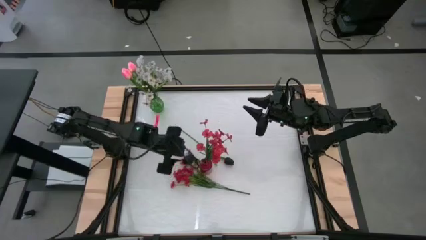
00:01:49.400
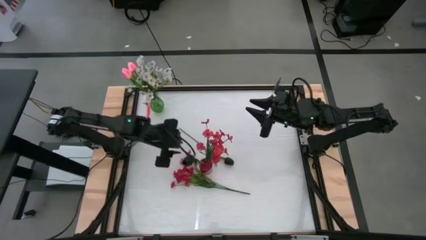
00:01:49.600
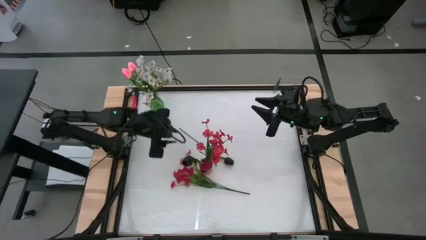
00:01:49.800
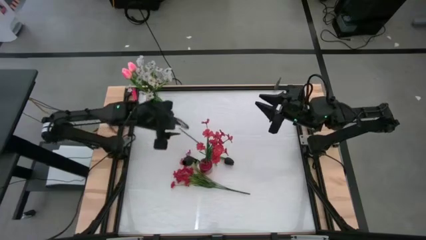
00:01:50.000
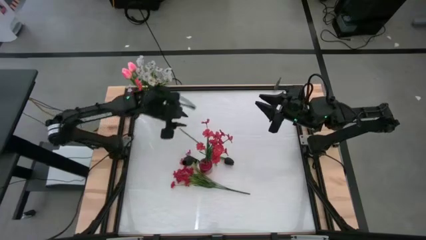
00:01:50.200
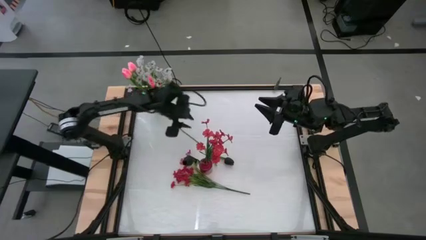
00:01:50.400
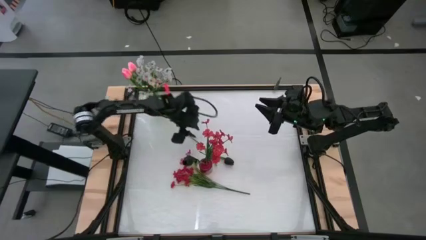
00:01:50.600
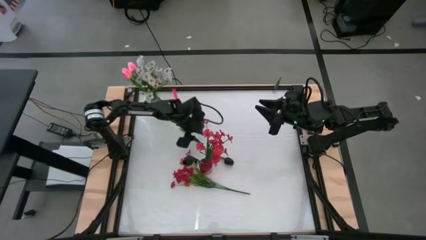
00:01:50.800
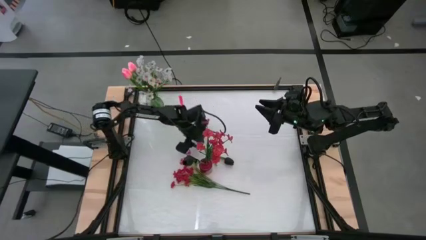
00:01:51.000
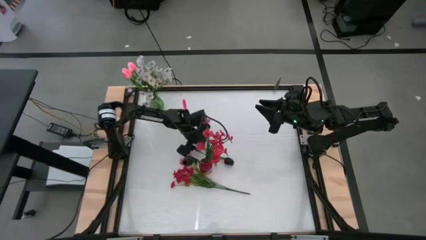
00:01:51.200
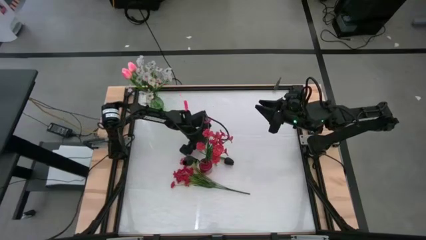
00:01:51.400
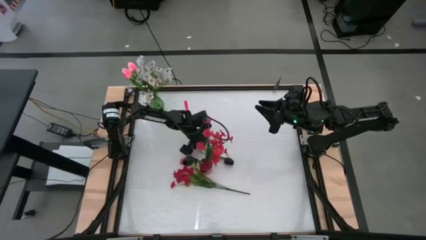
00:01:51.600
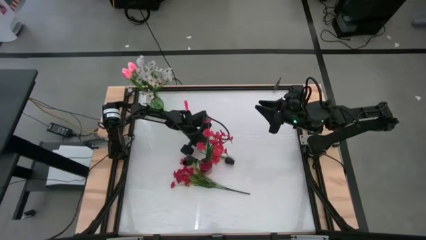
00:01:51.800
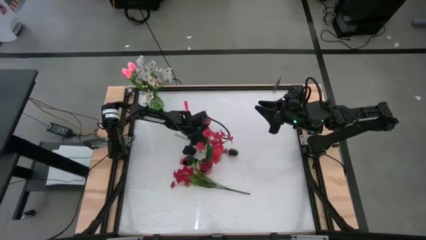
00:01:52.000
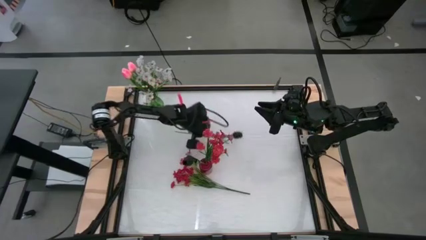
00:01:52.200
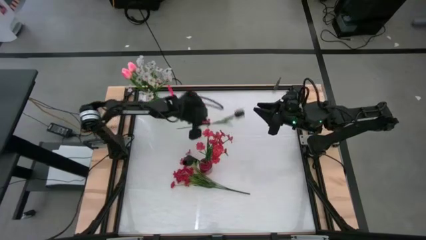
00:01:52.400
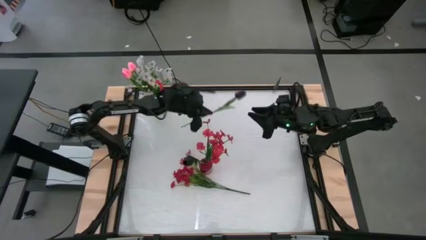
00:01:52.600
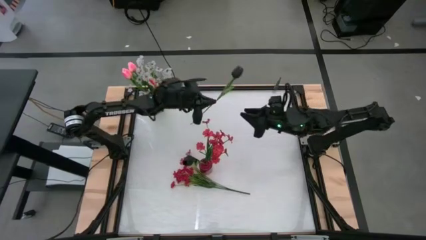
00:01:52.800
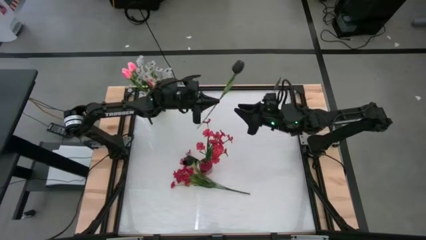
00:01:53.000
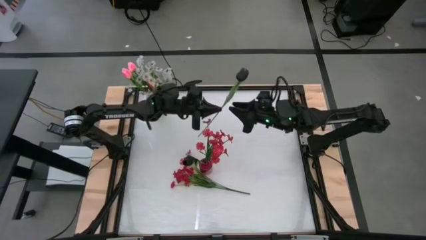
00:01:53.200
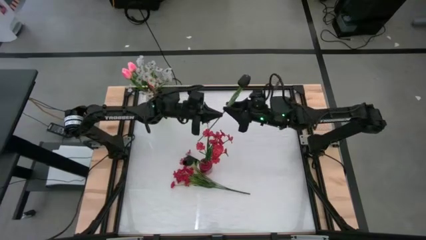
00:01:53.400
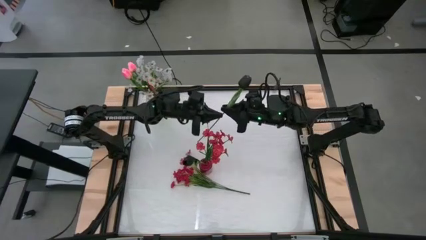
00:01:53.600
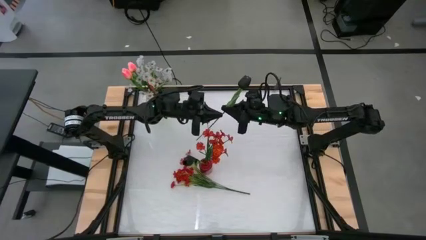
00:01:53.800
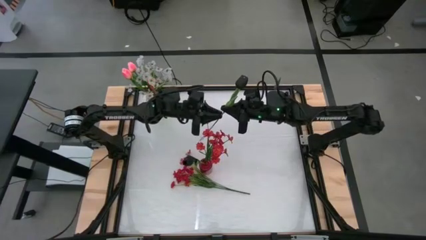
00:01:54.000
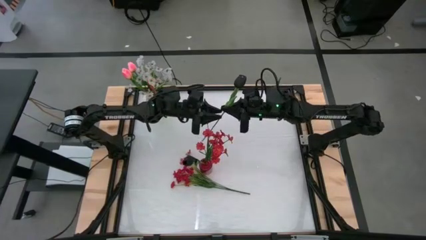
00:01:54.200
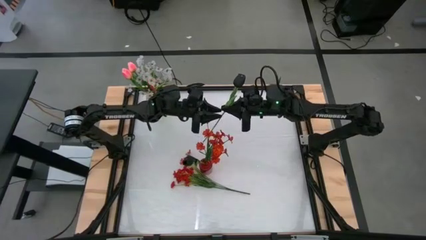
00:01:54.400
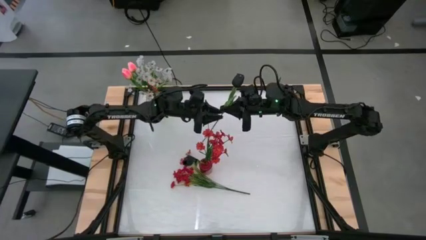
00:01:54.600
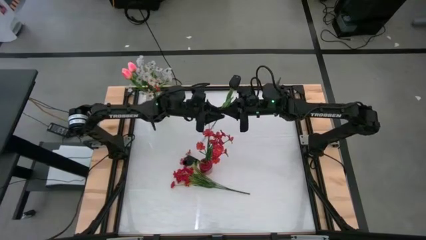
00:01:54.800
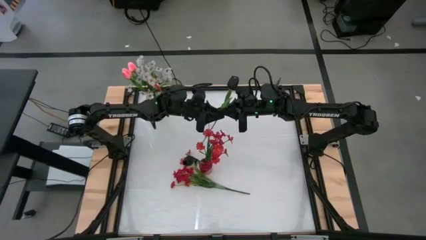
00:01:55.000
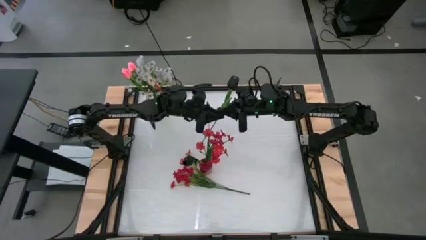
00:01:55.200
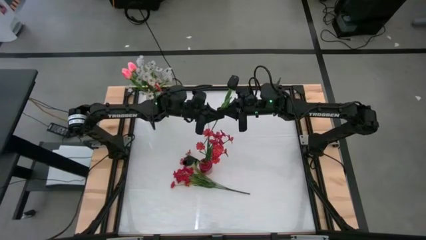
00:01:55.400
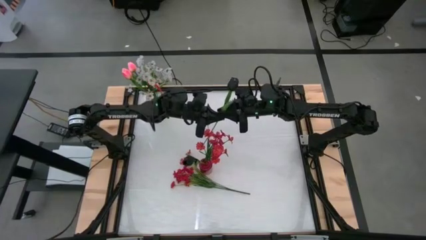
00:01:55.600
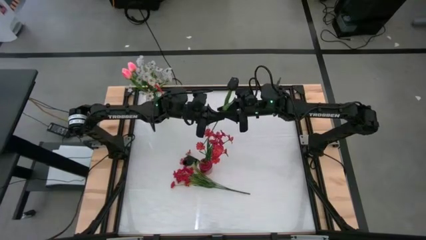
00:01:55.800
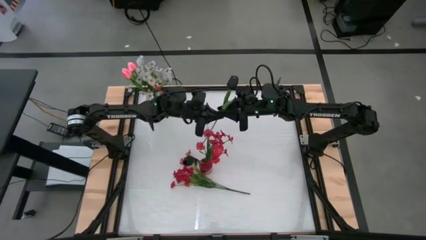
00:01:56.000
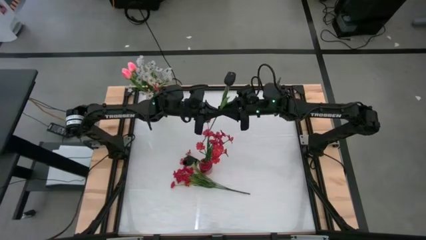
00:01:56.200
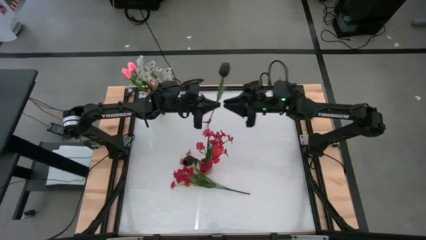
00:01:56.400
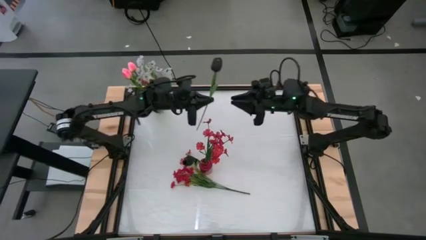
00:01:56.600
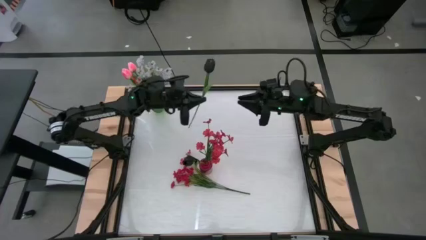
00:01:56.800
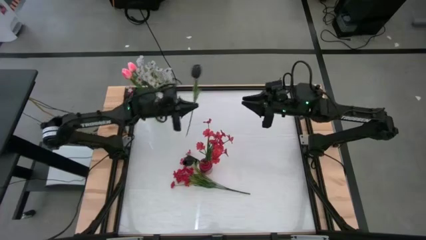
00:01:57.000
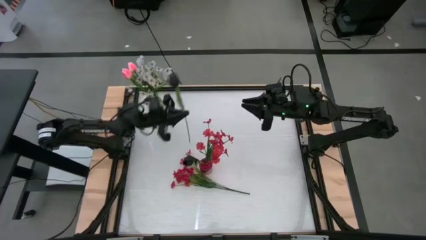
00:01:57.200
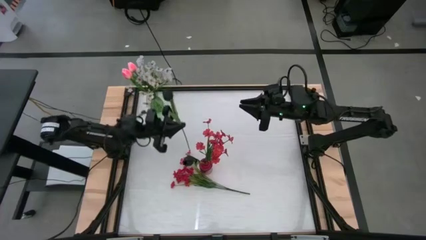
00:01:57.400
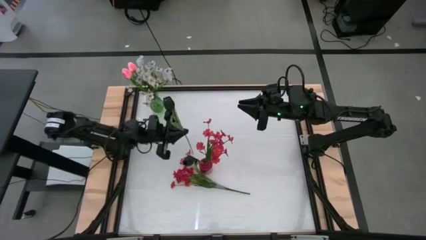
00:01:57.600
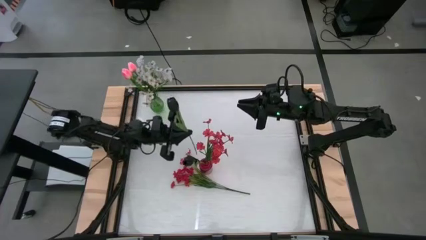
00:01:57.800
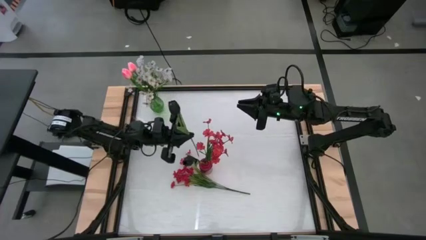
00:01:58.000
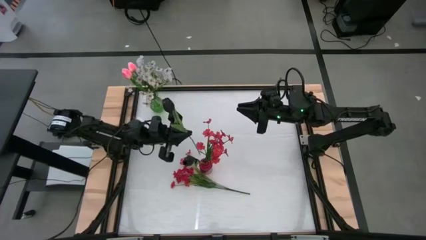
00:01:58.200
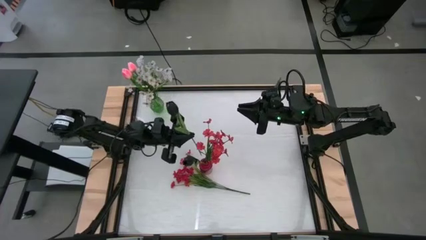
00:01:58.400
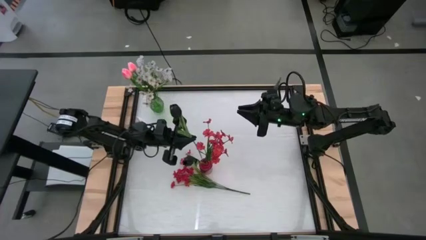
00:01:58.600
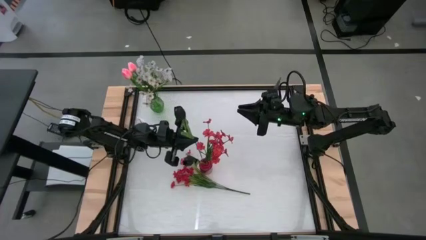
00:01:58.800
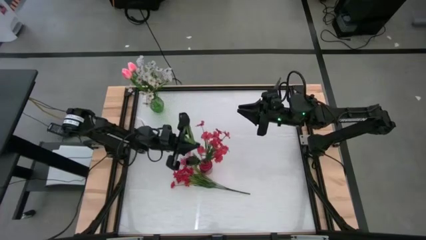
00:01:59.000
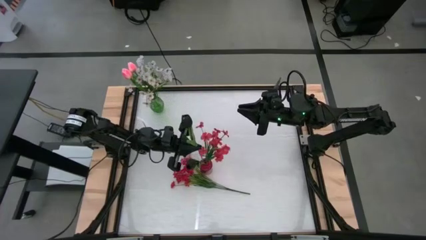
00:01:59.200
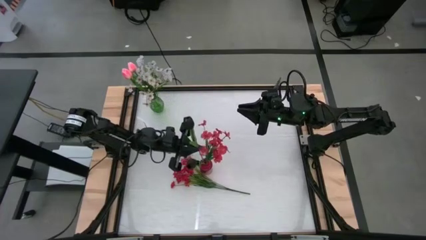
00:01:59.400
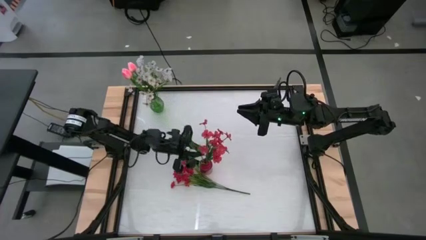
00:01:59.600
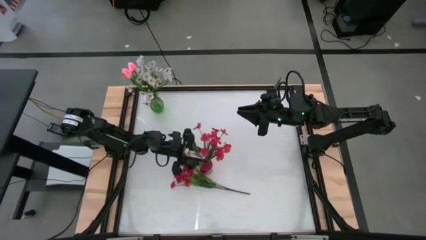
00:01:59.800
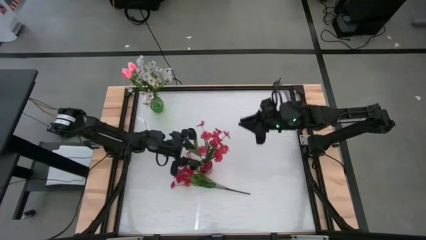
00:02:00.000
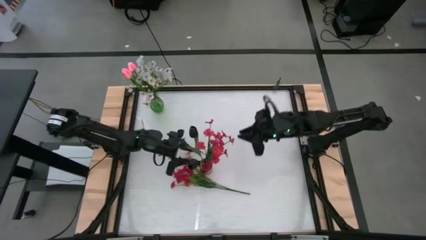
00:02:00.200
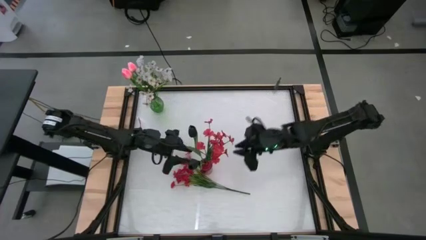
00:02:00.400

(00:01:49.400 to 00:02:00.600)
Task: Sort flowers into vase by color
Put the black flowers into the red flower vase

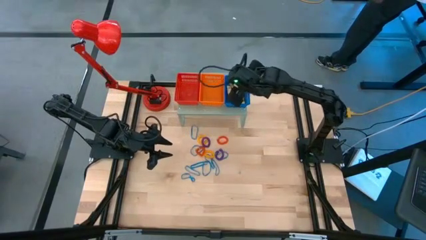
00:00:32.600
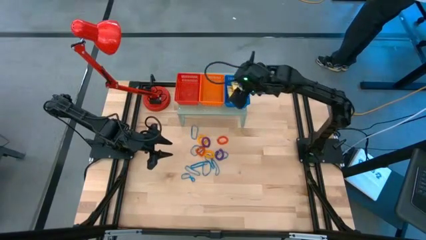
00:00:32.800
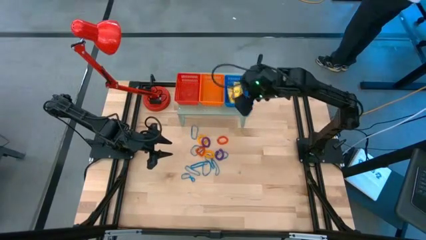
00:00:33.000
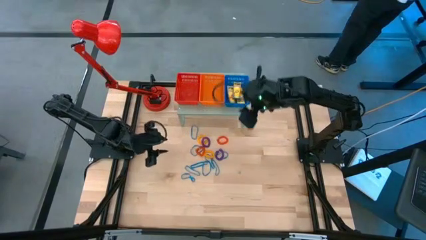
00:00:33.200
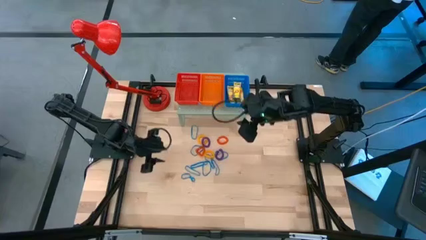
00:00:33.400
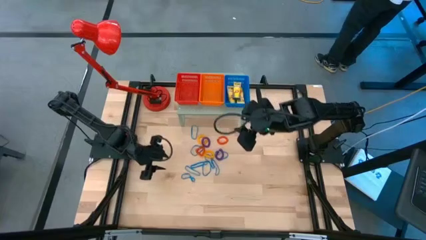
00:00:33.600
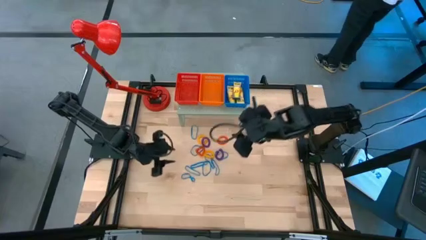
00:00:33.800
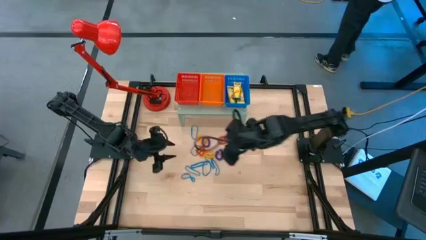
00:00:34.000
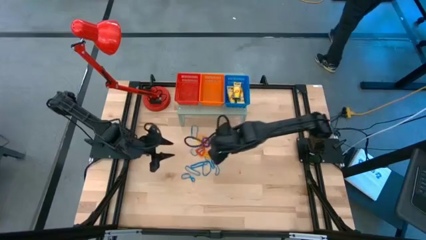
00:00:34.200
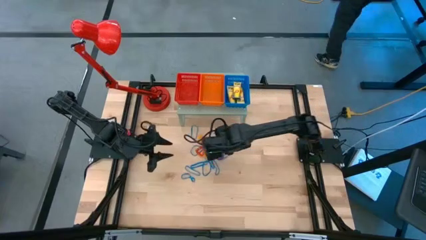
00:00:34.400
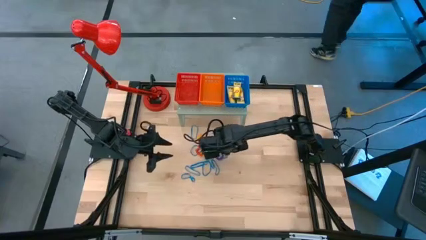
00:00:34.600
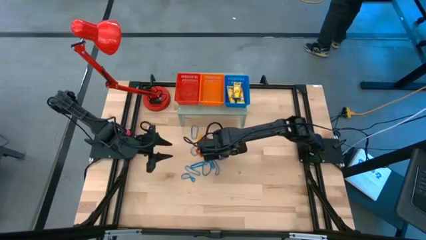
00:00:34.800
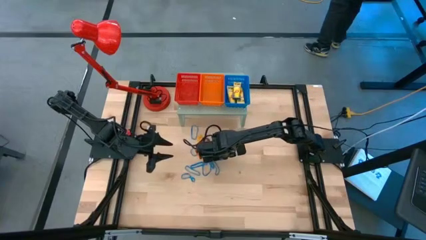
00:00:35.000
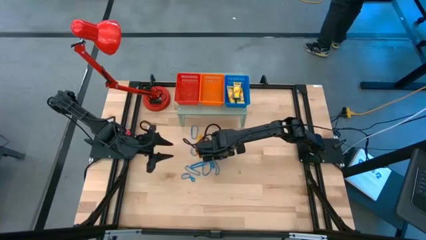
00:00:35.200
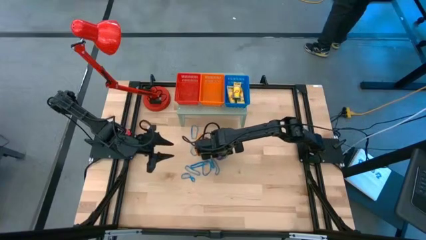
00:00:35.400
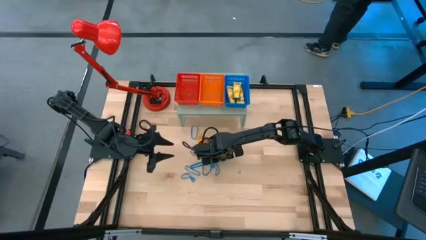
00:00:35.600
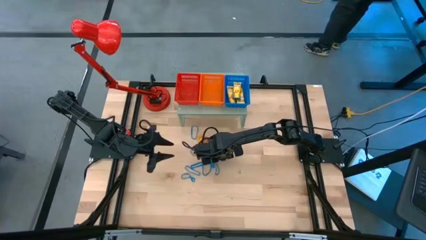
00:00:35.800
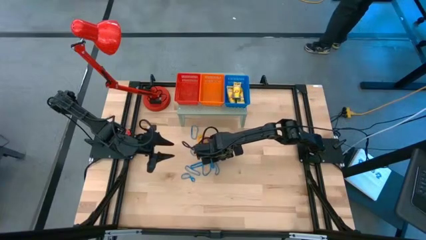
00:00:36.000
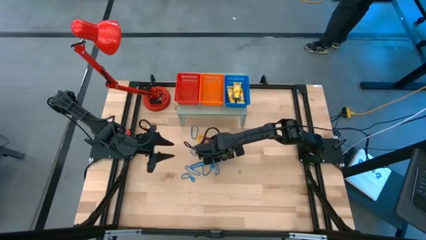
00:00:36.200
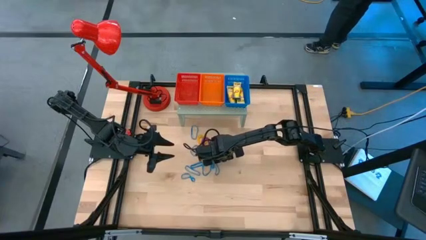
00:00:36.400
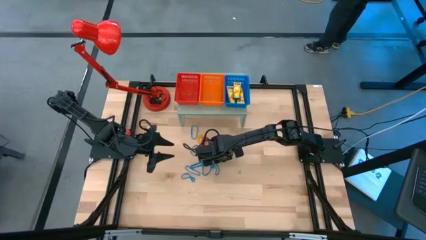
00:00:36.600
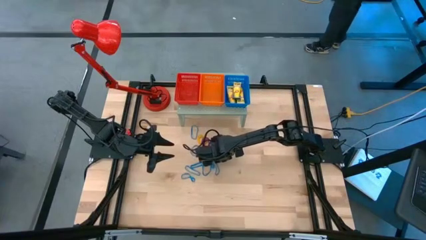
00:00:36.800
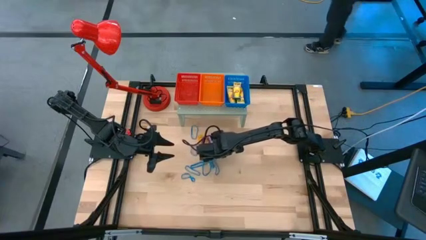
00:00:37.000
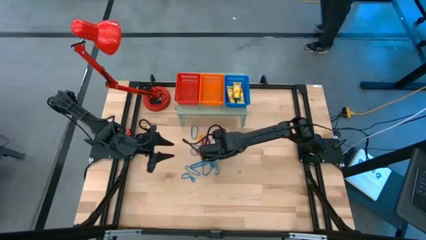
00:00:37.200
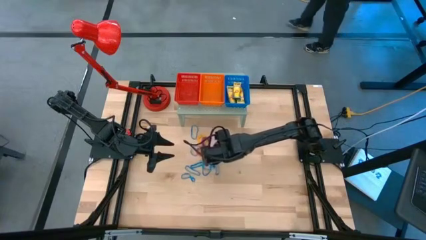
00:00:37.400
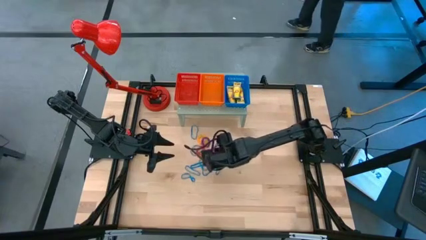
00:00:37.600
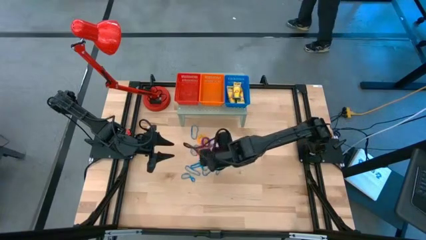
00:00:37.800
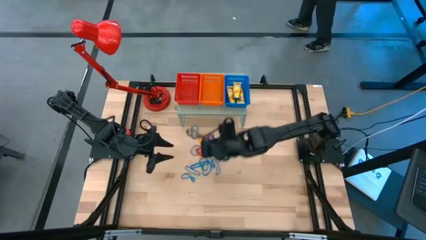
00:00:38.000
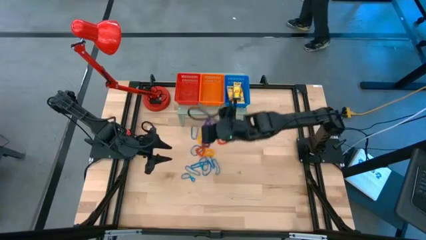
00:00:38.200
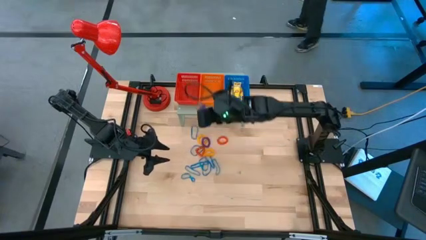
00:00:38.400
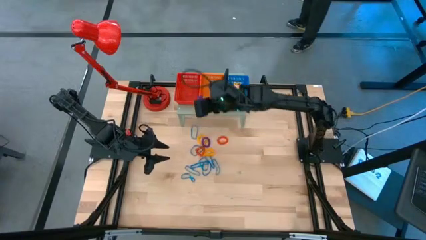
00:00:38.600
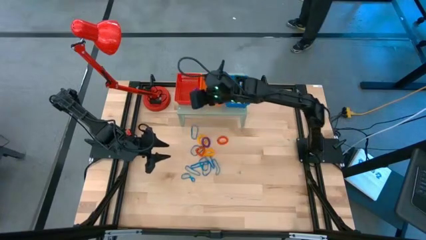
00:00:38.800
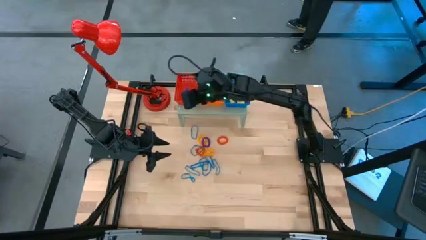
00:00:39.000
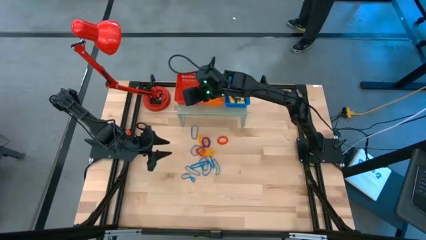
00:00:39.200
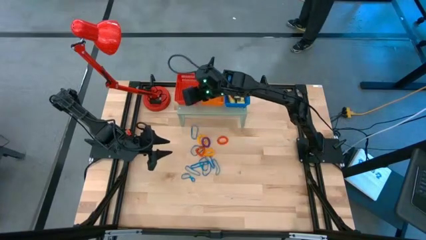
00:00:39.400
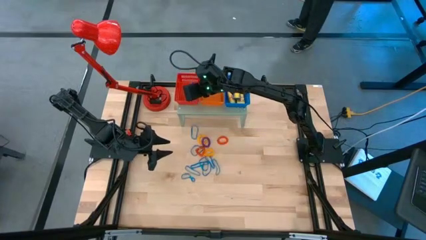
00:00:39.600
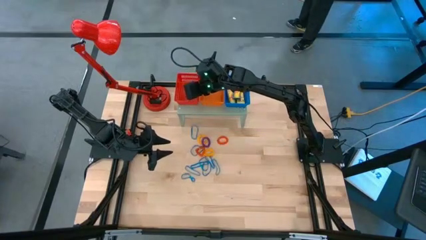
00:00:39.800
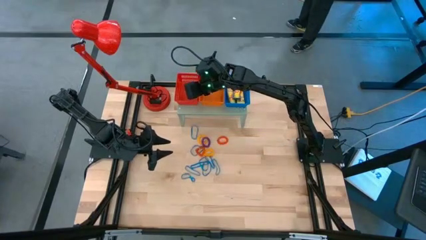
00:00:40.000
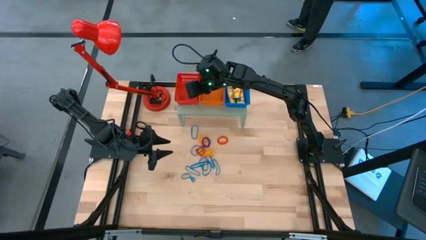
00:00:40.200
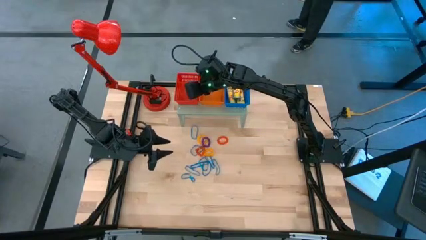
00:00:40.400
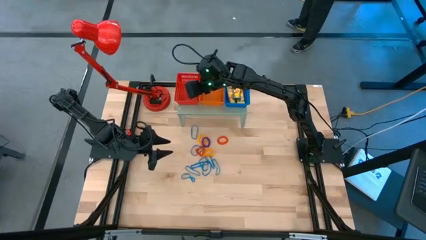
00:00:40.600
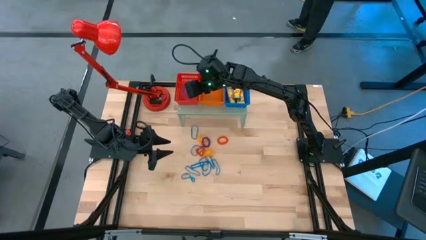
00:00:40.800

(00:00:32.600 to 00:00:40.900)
Task: Pick & Place Office Desk Supplies
Put the violet spring keychain into the red bin on the shelf
